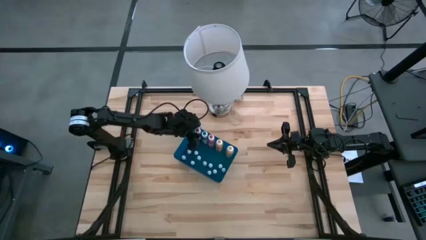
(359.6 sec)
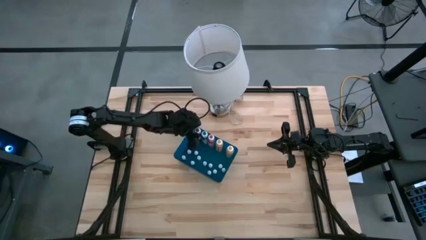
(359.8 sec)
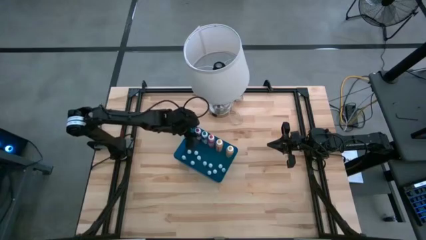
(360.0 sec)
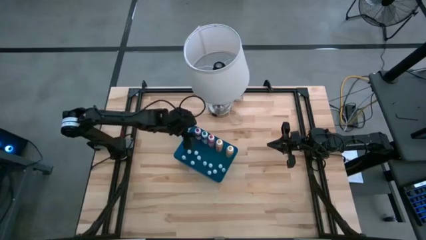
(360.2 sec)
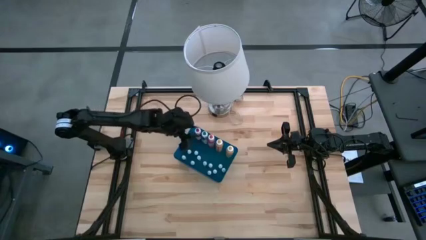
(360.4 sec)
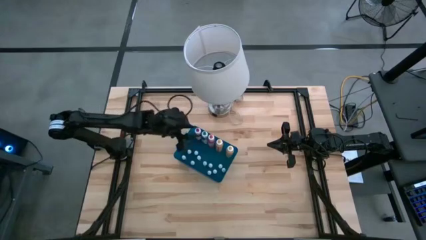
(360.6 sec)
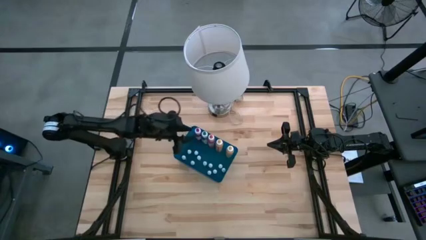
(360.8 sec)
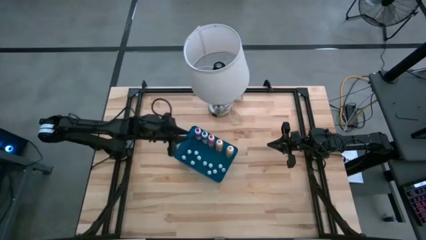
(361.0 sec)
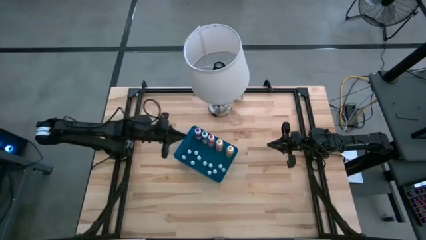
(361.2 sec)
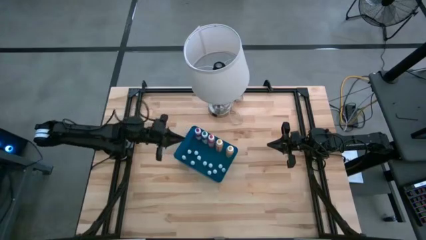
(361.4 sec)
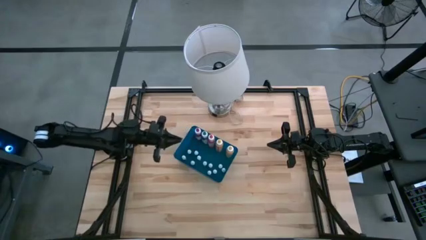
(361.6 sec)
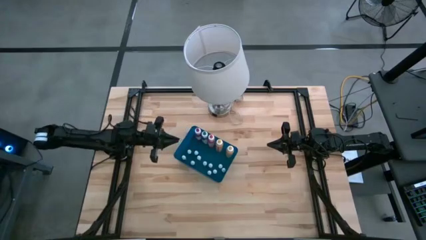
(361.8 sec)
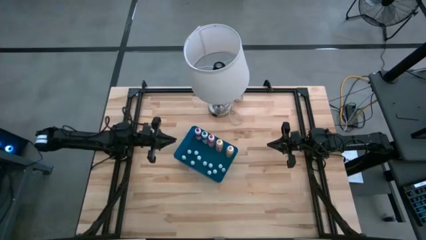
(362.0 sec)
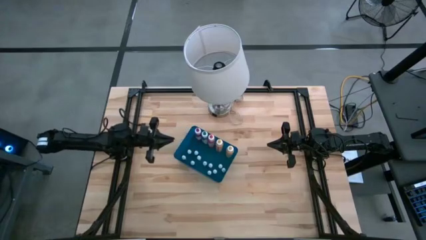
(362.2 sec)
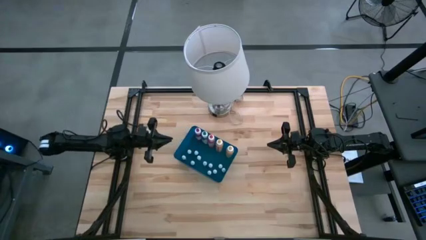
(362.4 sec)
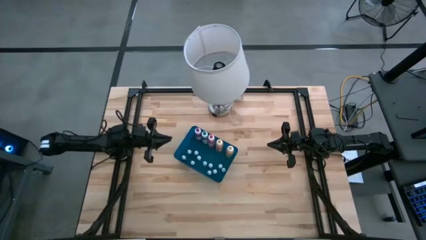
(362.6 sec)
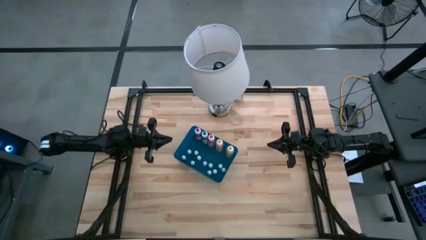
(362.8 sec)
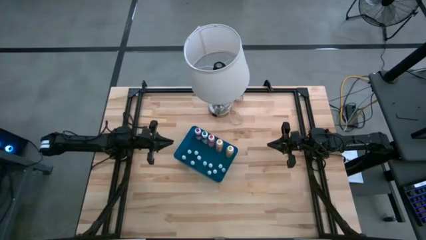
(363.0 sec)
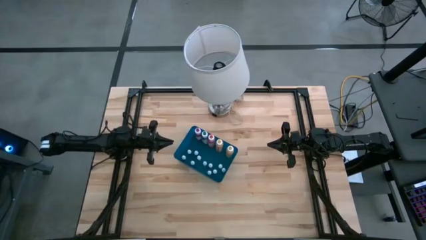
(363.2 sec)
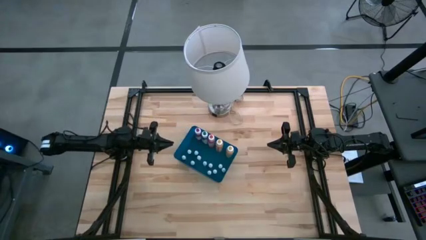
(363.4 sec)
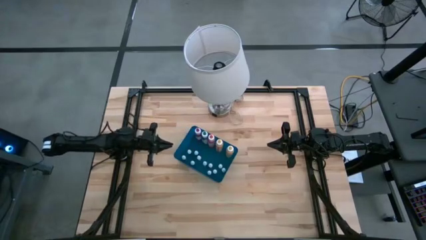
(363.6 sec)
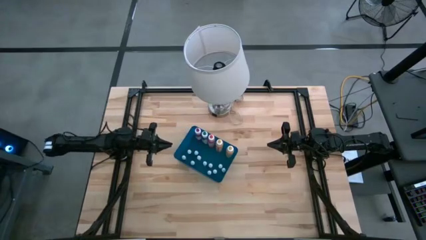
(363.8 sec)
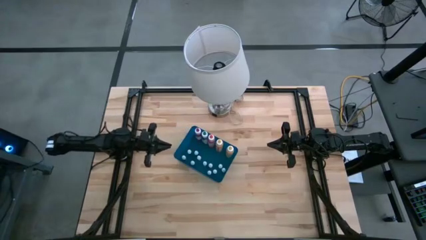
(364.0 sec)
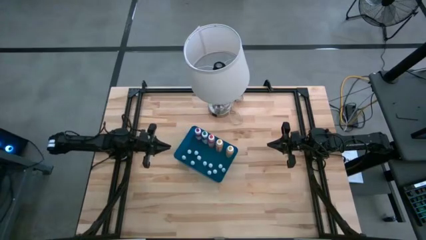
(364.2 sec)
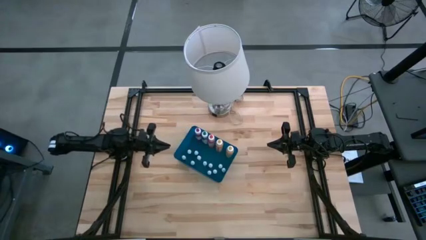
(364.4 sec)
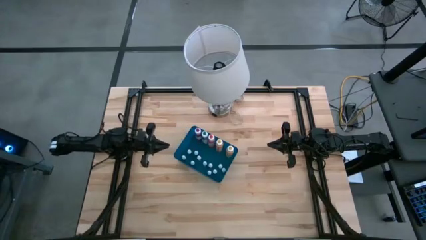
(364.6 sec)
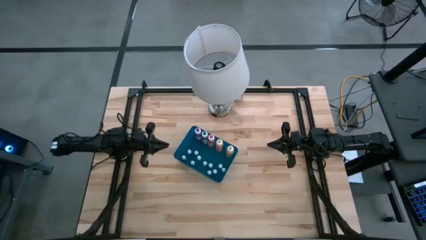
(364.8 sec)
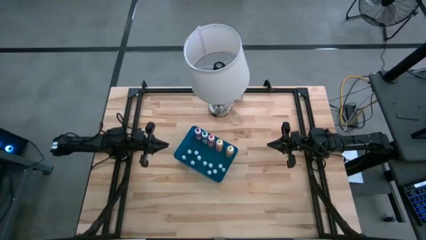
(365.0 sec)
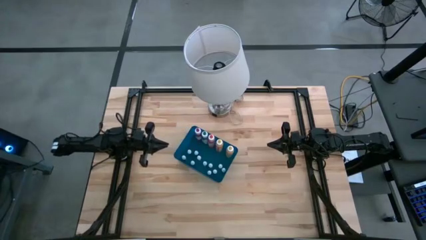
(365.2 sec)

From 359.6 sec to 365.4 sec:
Task: Pick & Place food coloring
Return to Home Position
